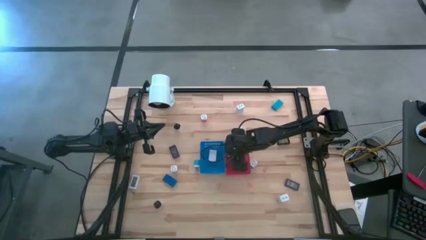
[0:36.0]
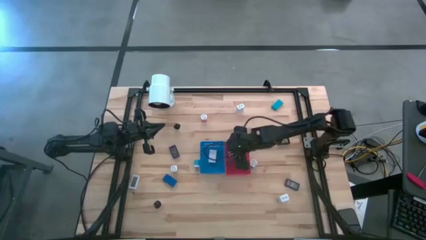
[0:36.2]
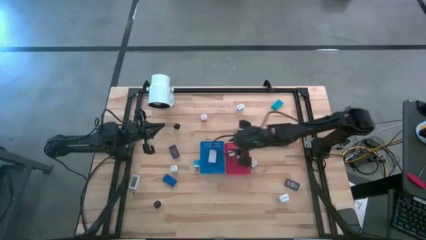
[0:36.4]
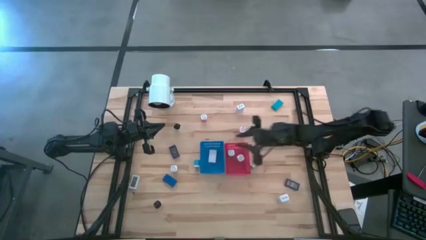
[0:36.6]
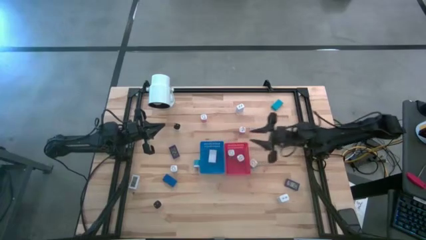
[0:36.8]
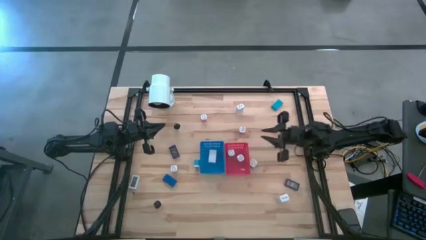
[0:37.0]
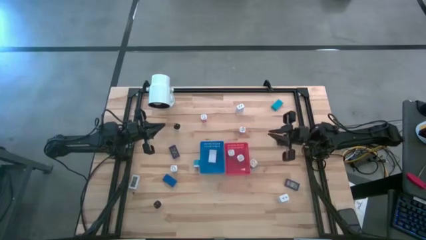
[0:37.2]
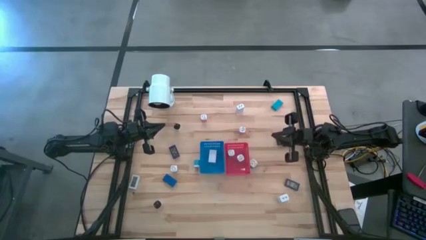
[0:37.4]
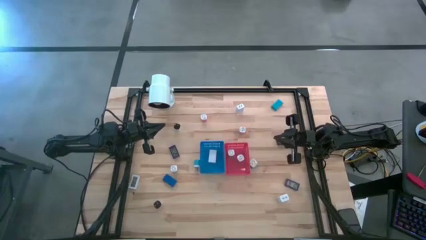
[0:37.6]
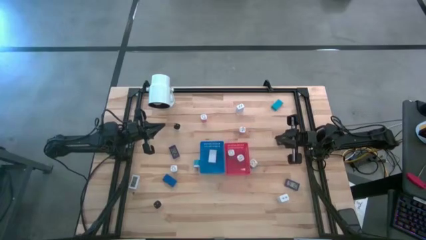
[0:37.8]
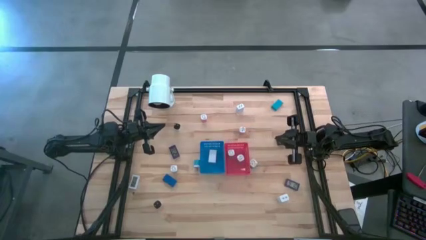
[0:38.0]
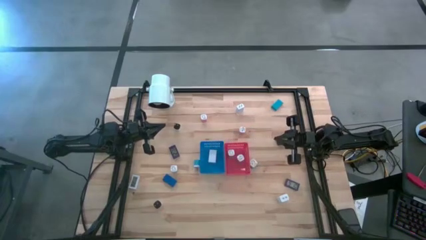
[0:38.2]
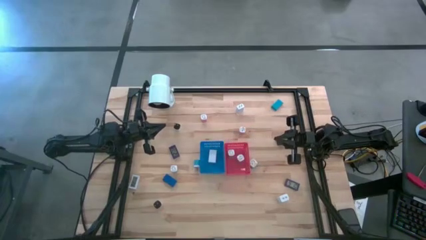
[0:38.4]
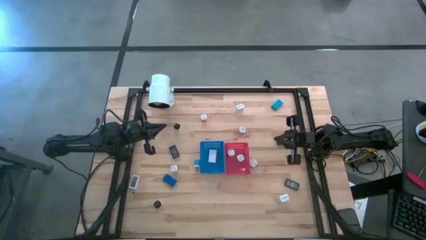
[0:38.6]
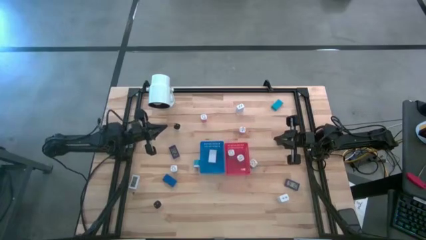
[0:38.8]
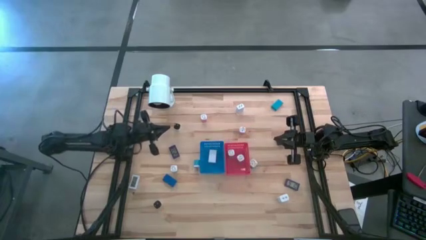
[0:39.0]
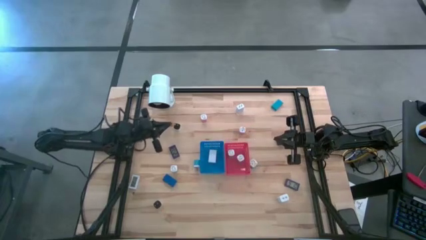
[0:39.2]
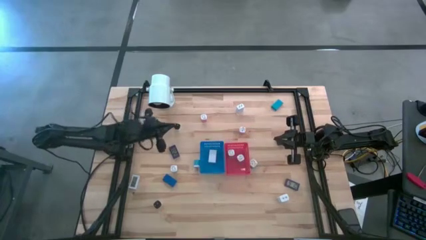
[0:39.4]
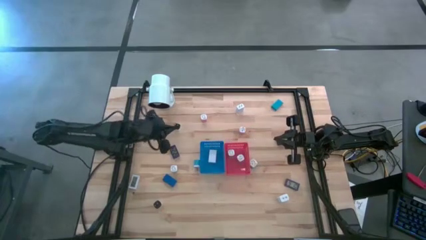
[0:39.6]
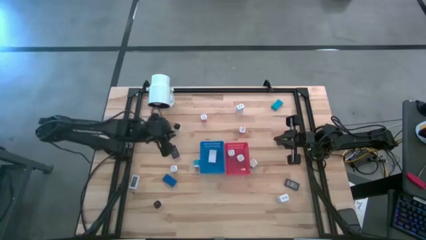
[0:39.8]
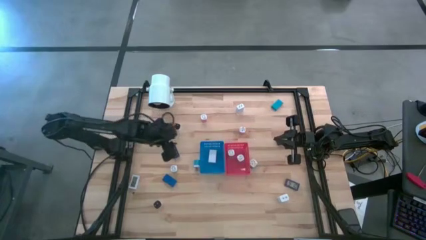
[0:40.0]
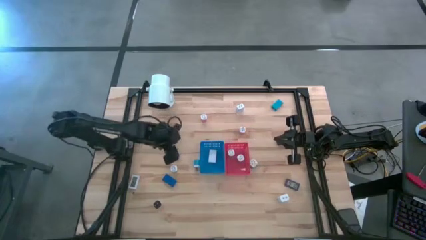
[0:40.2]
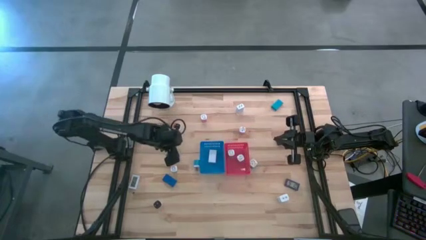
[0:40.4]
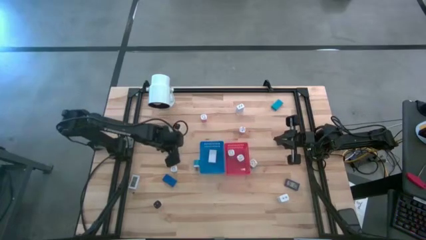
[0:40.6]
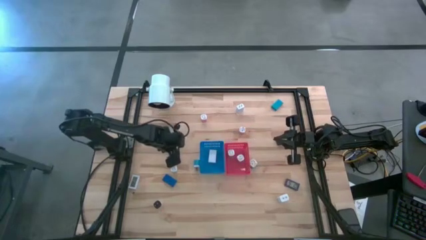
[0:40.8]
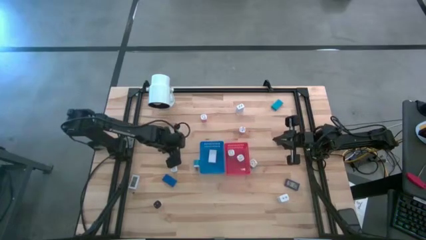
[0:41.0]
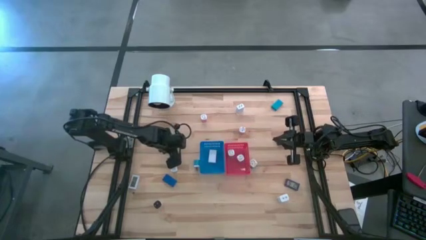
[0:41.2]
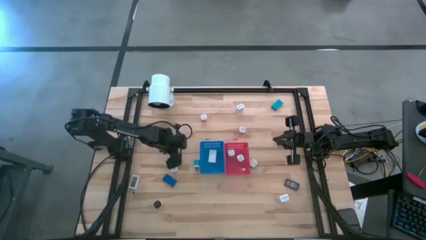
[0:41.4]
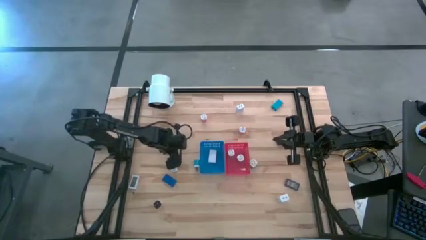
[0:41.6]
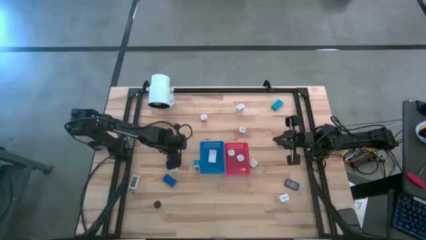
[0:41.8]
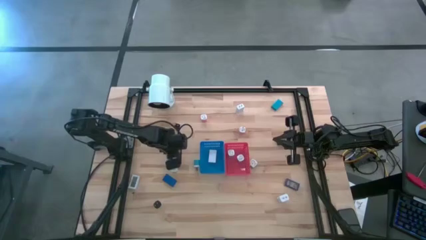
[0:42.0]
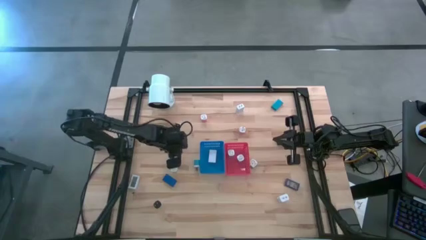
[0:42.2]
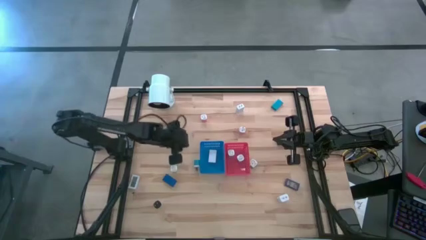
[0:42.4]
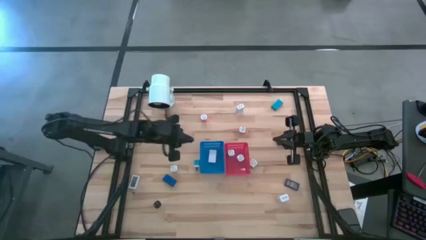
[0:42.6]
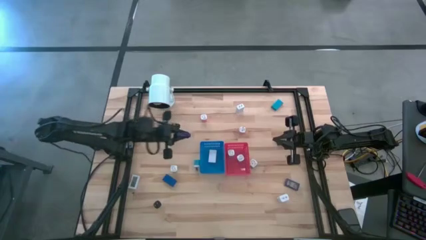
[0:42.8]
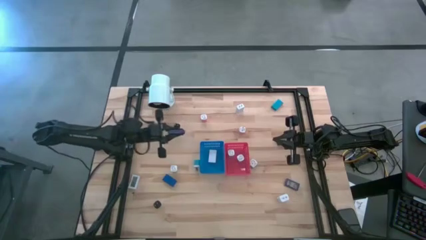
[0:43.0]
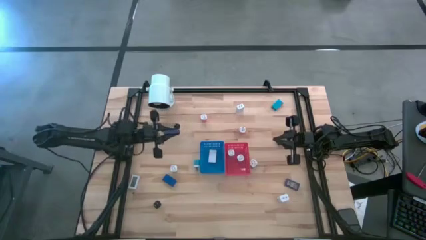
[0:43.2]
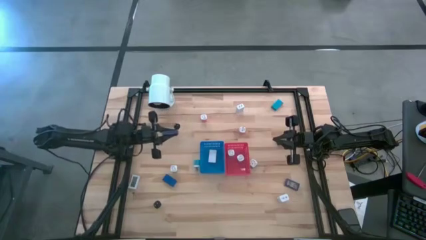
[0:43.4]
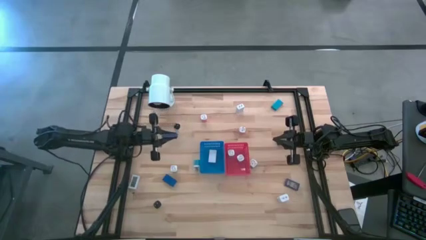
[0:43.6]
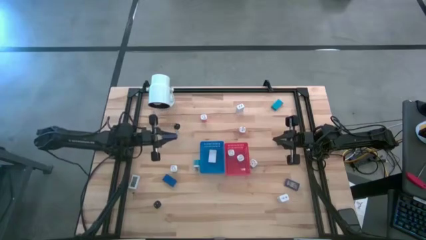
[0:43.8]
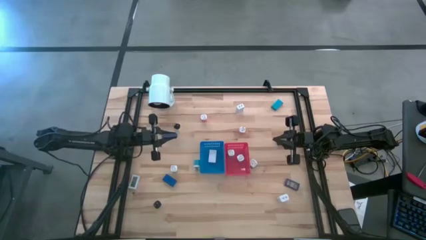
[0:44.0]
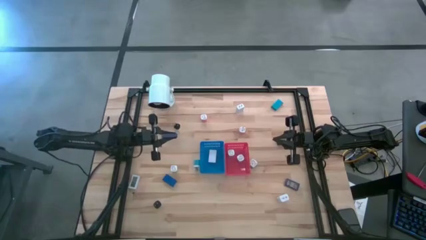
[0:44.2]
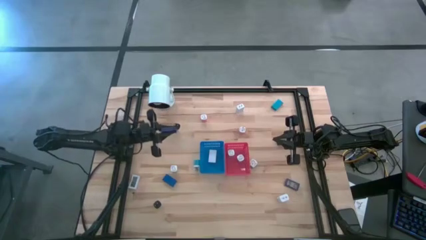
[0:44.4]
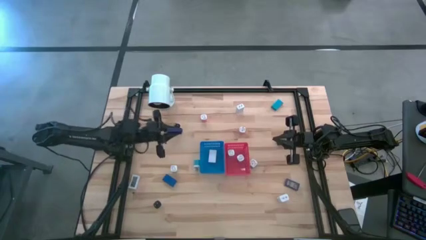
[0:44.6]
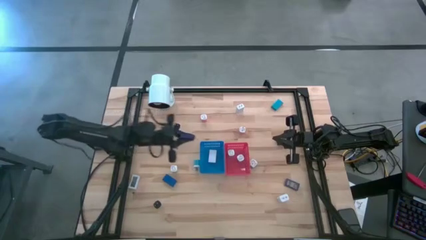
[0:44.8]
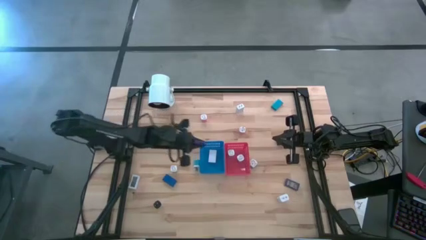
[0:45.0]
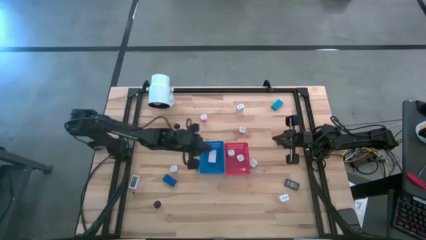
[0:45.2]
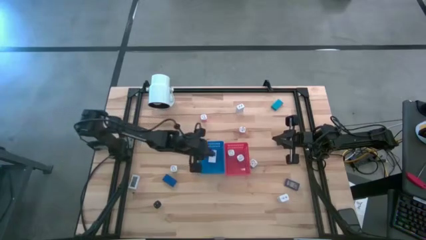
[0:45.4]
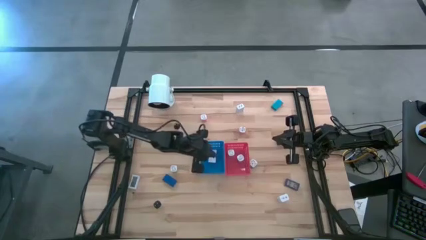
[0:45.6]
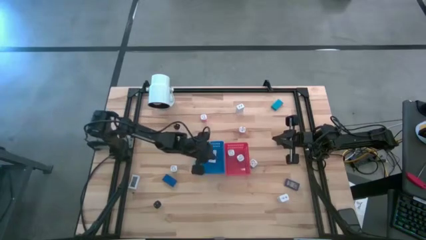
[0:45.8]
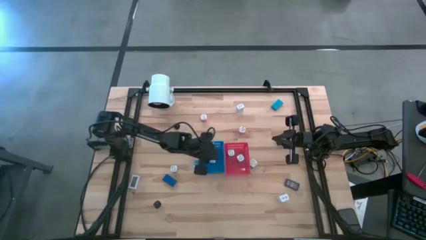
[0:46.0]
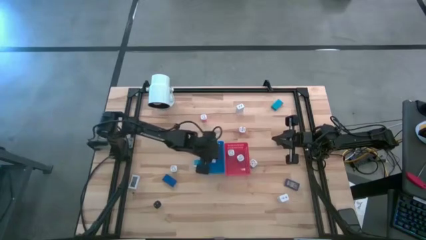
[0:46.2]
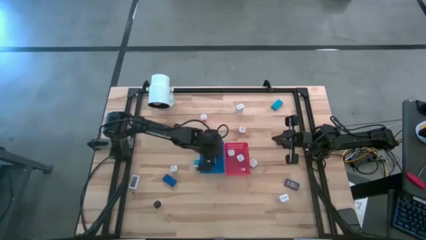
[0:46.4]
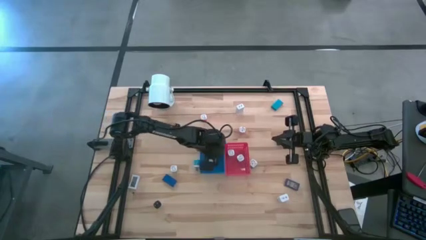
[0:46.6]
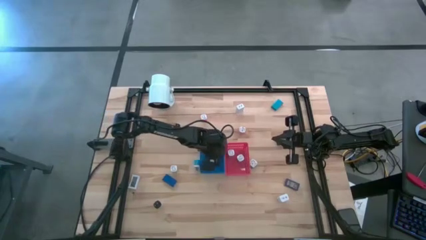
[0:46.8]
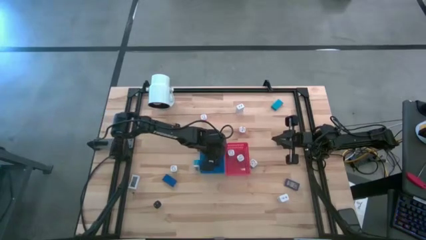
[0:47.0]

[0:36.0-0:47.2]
Task: Sort adapters and digital timers
Put the dark blue timer into the blue bin

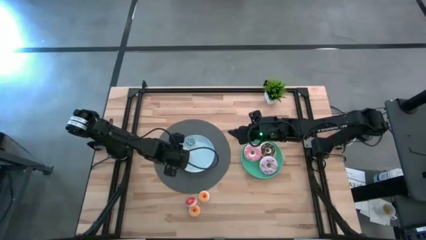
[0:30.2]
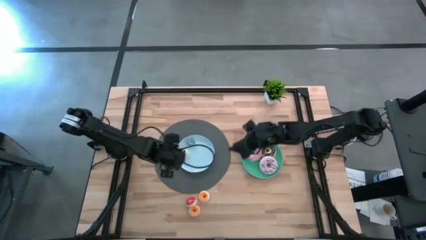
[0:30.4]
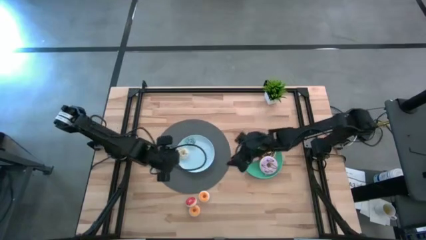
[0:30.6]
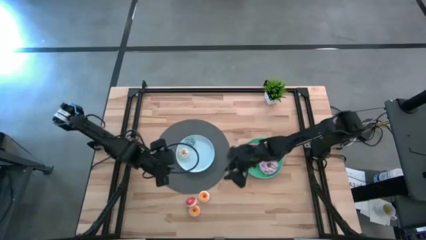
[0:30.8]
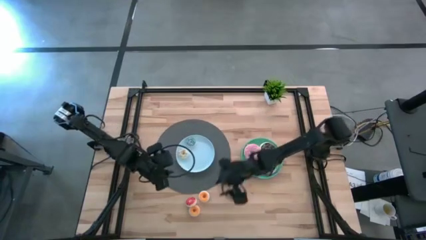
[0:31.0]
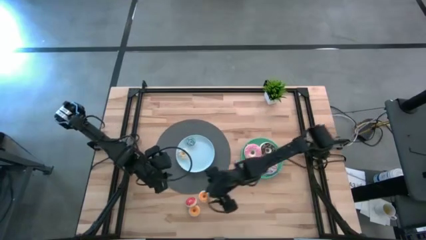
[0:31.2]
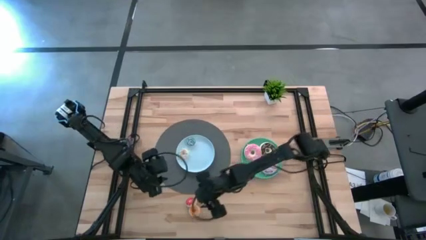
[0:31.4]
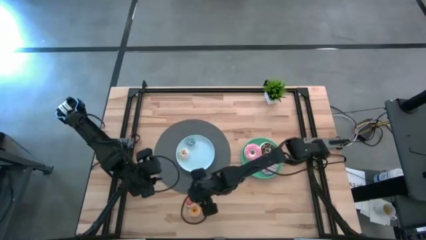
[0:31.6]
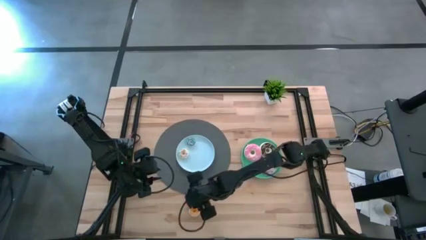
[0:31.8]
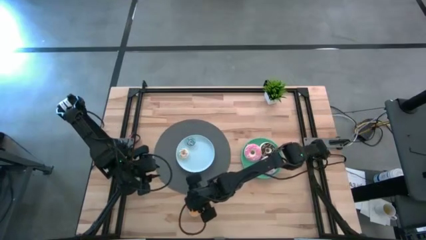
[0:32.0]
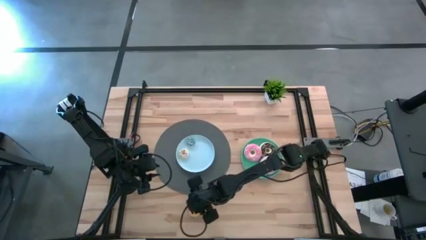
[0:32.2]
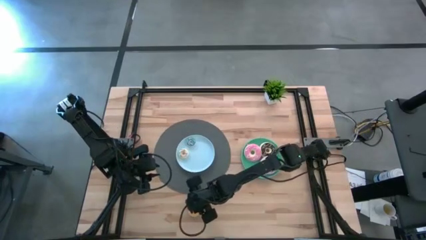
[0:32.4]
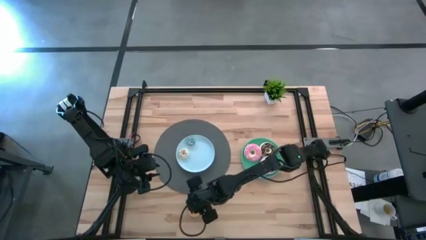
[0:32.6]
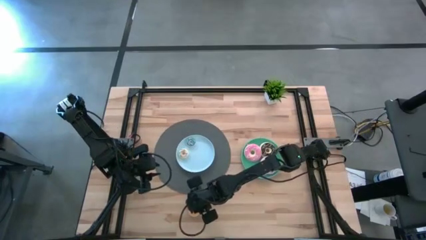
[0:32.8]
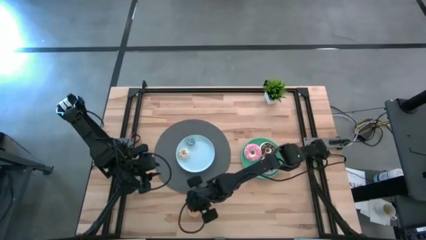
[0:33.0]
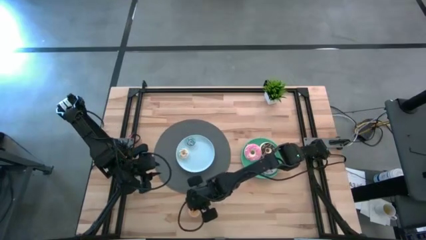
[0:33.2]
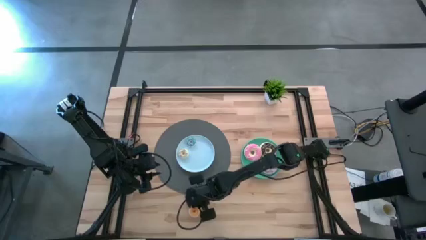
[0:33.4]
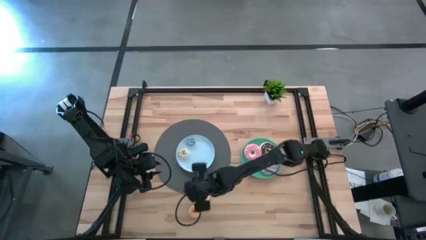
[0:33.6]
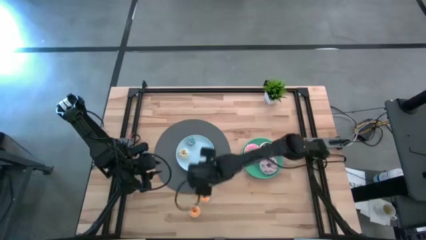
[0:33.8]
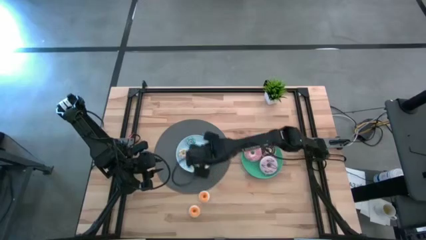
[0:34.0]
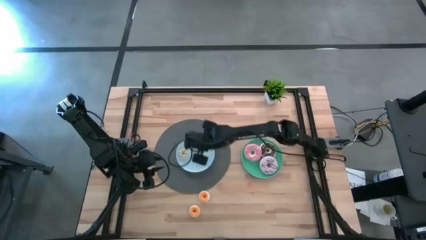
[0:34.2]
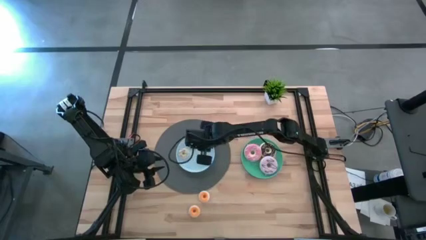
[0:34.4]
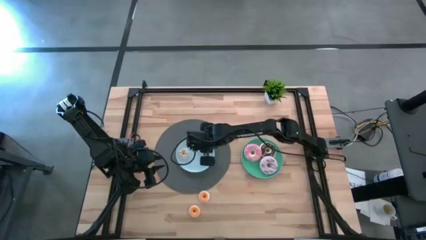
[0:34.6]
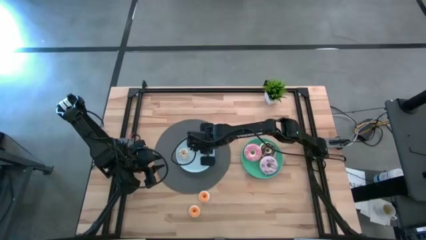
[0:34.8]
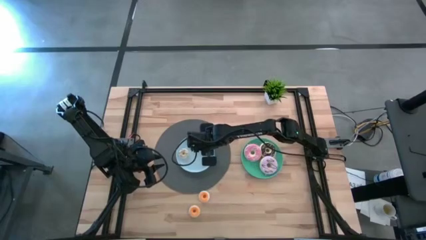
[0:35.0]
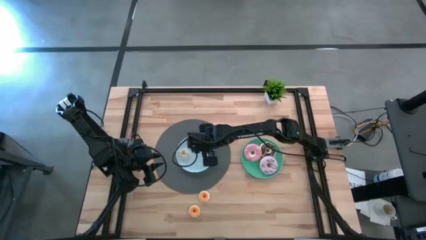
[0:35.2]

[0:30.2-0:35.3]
Task: Pick & Place donuts
Put the small red donut on the blue plate
